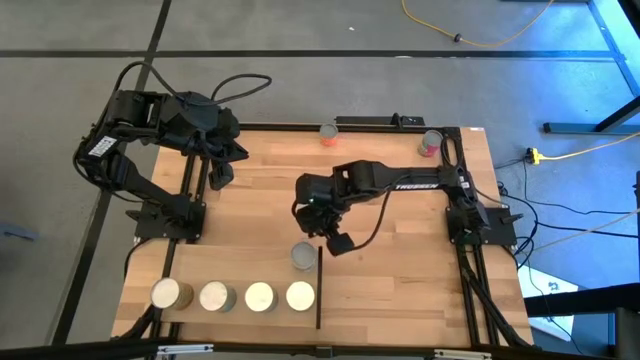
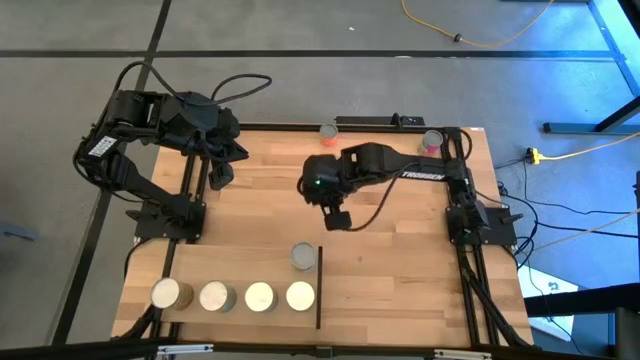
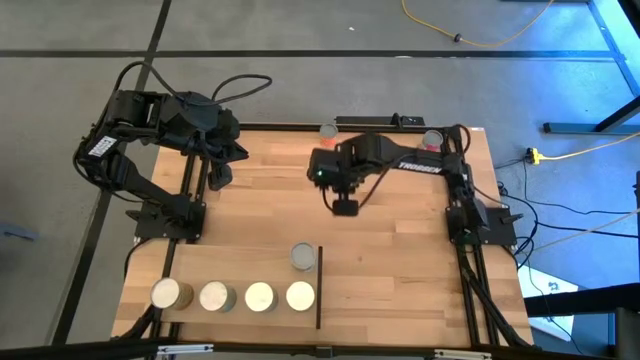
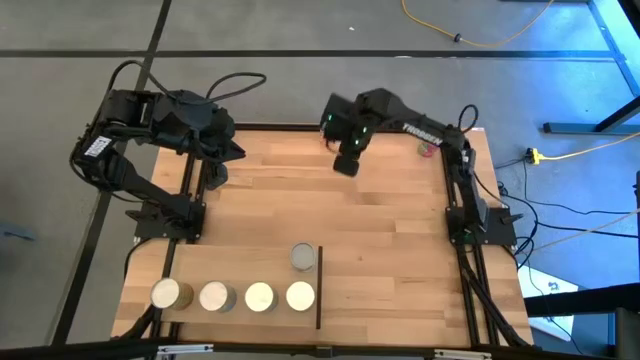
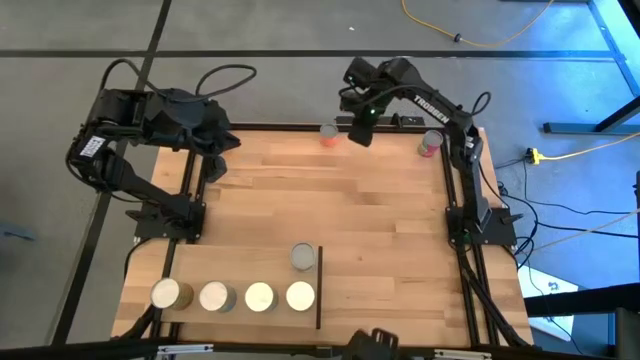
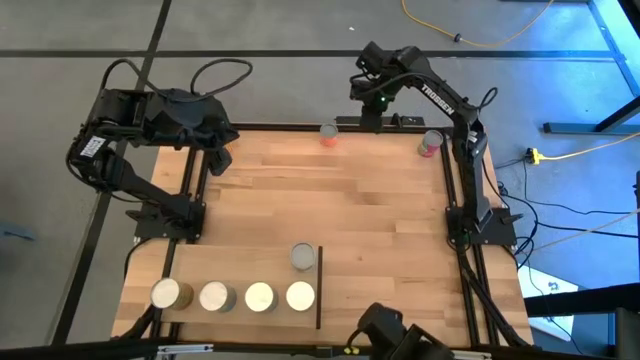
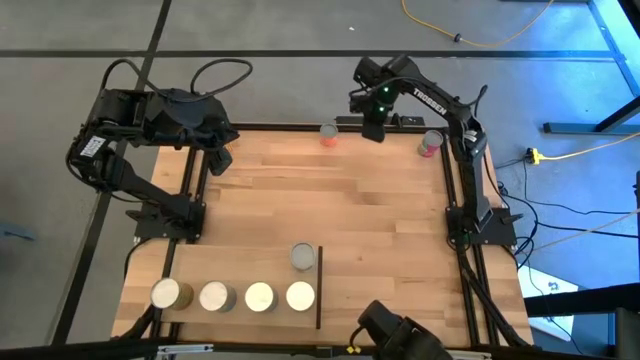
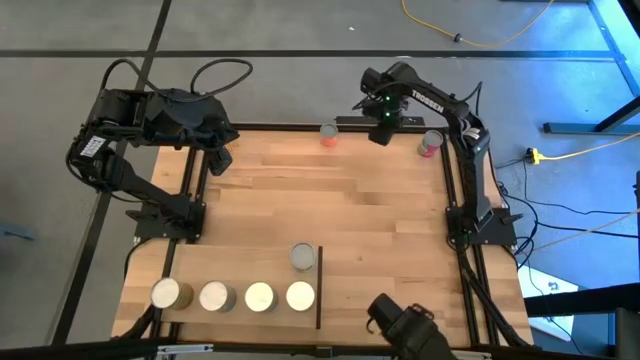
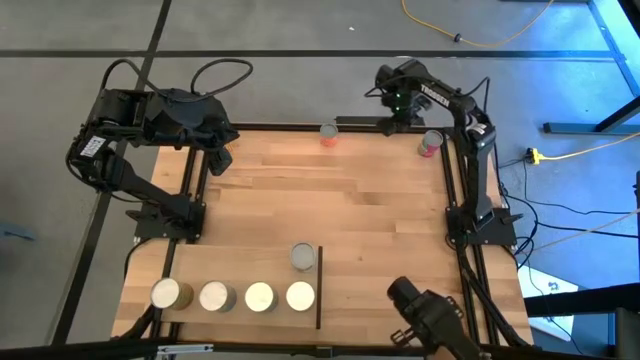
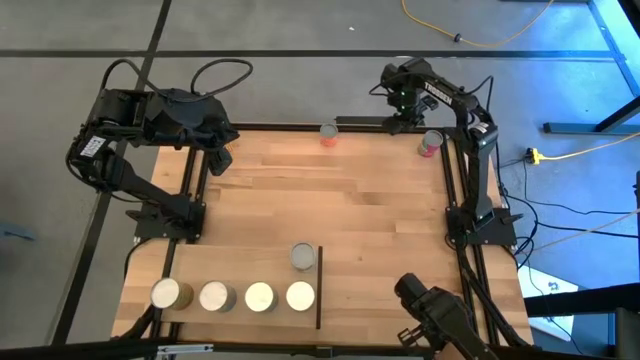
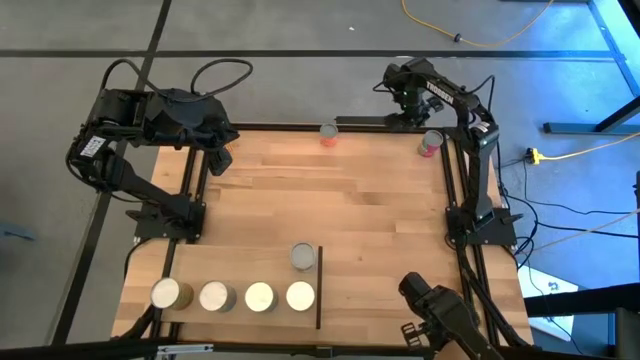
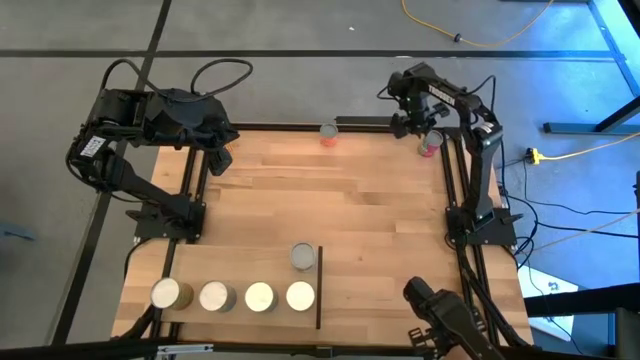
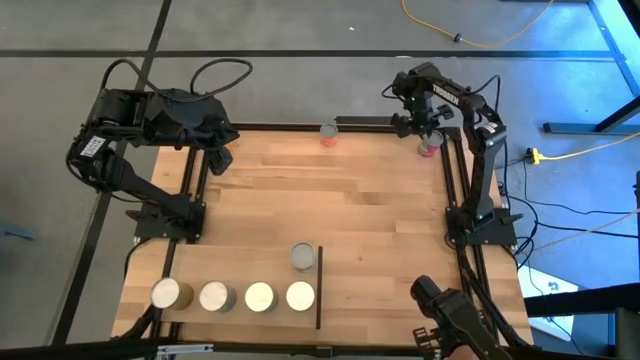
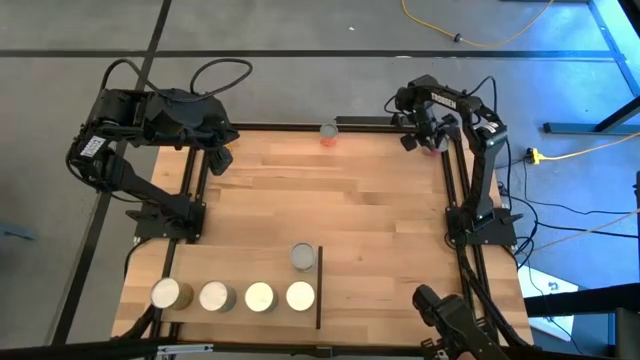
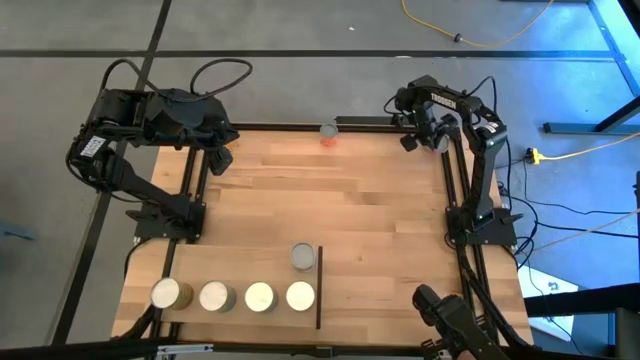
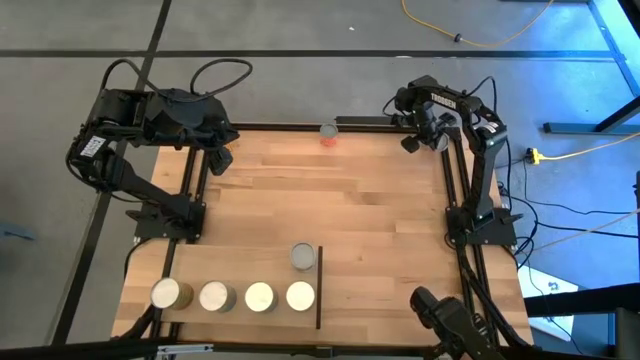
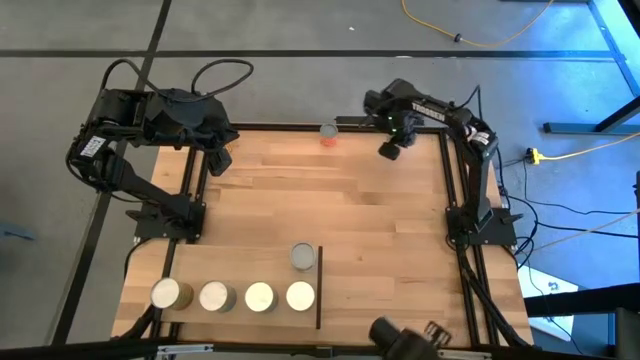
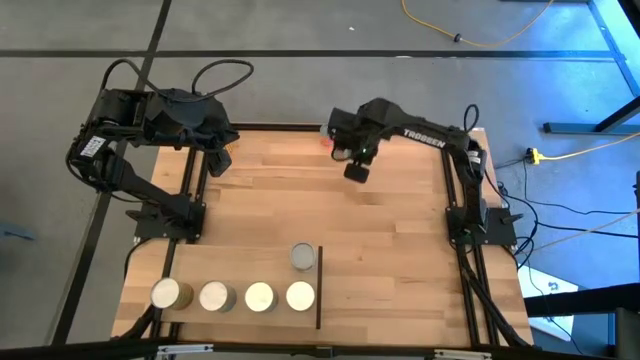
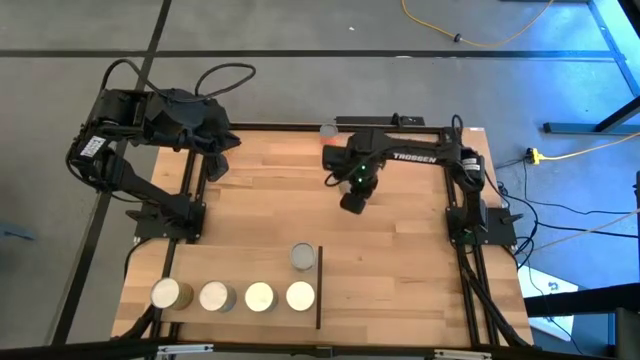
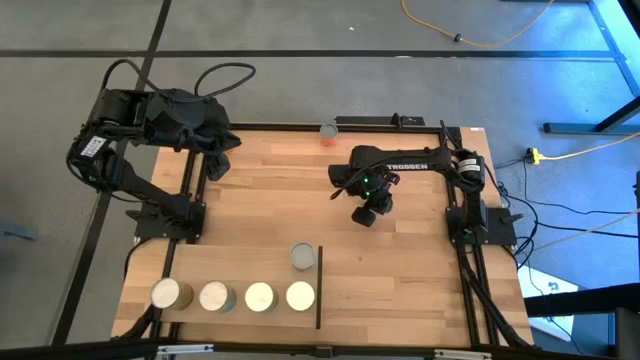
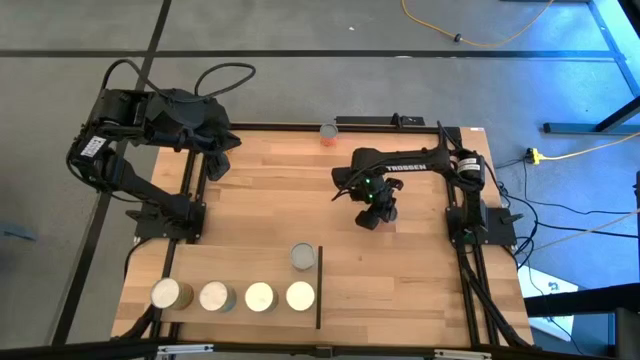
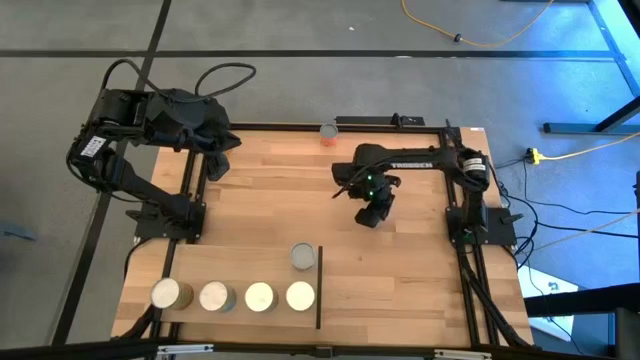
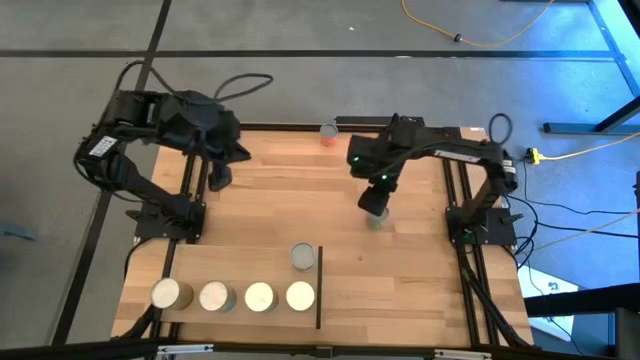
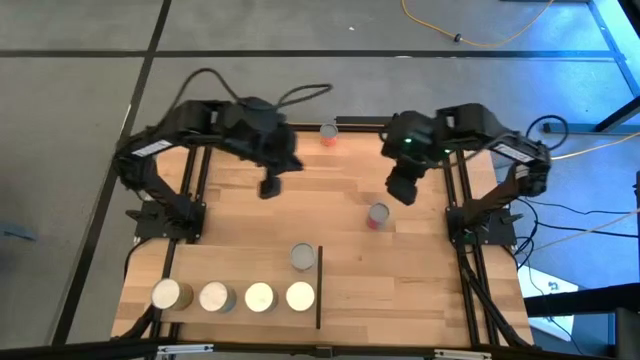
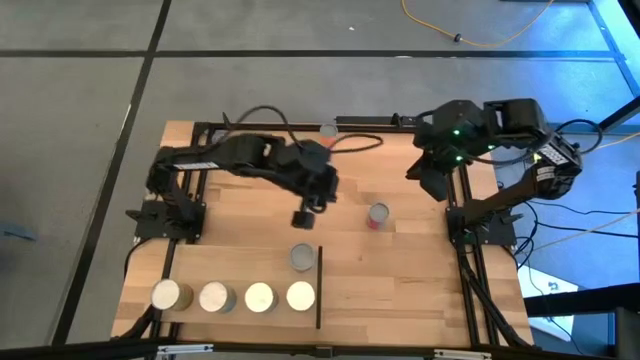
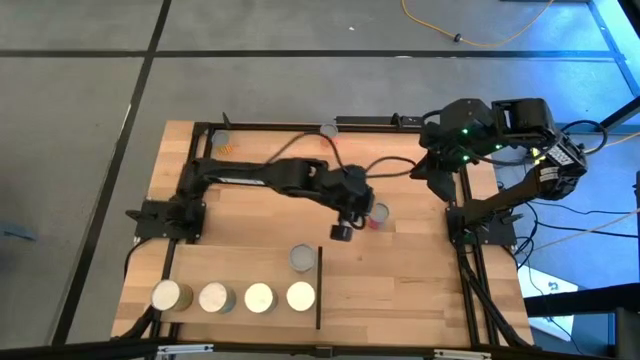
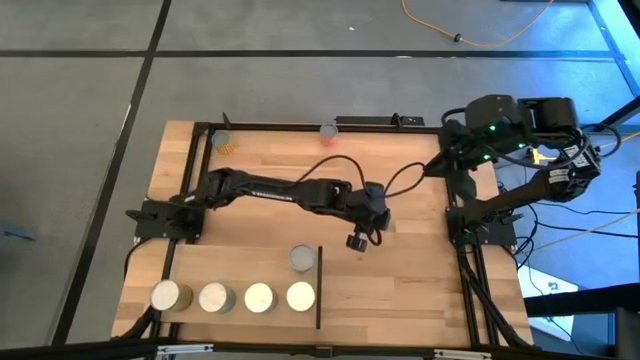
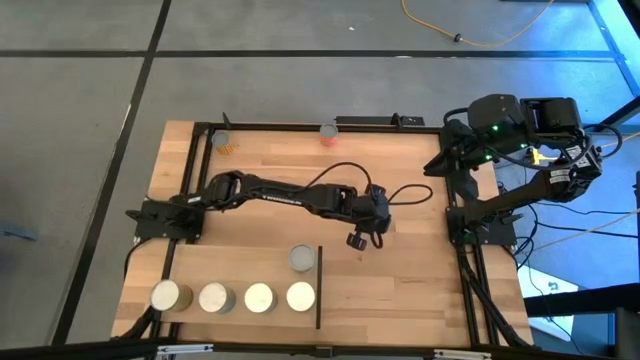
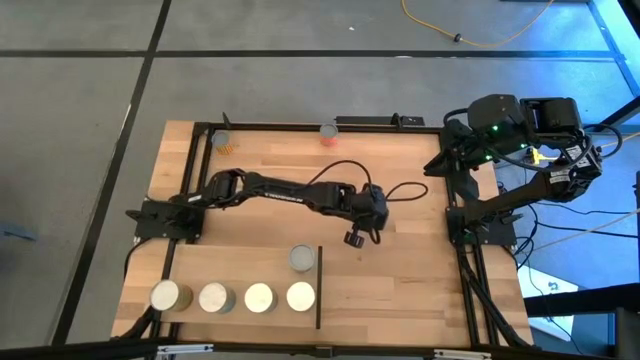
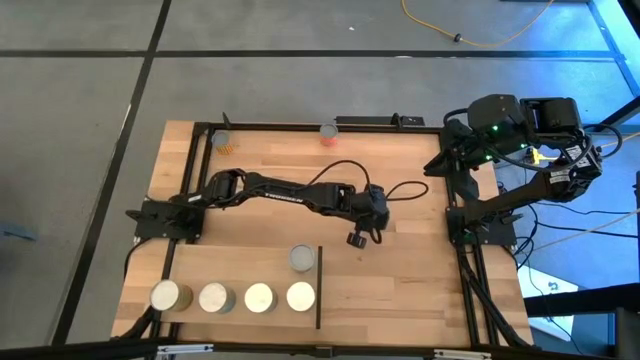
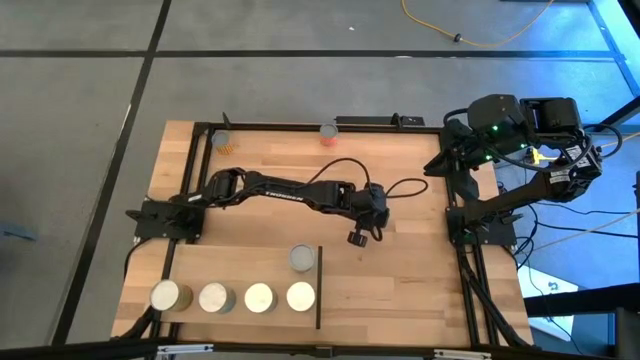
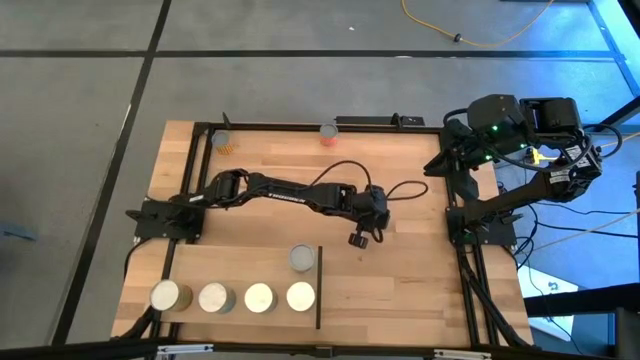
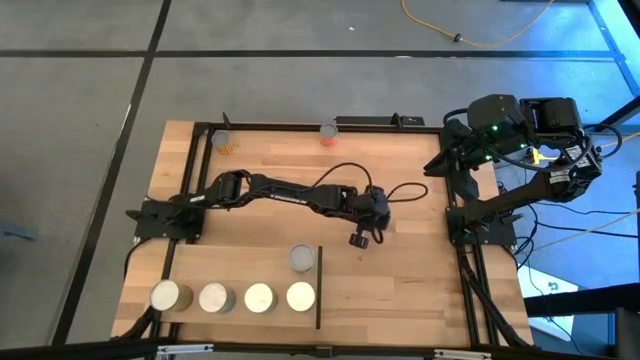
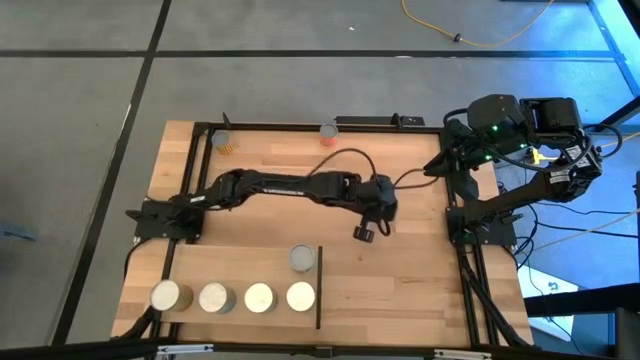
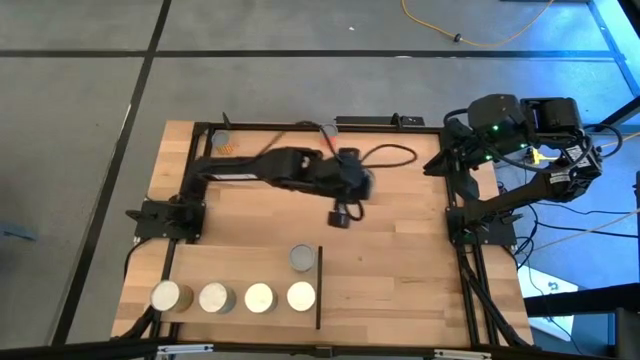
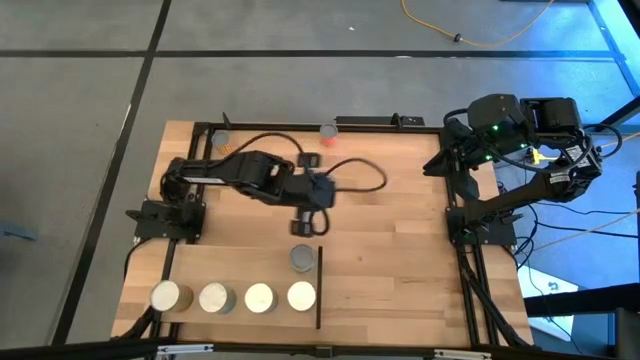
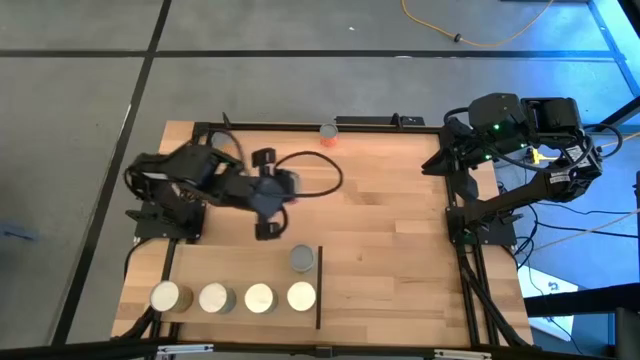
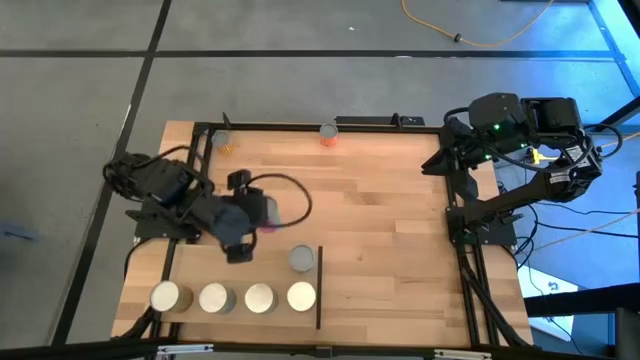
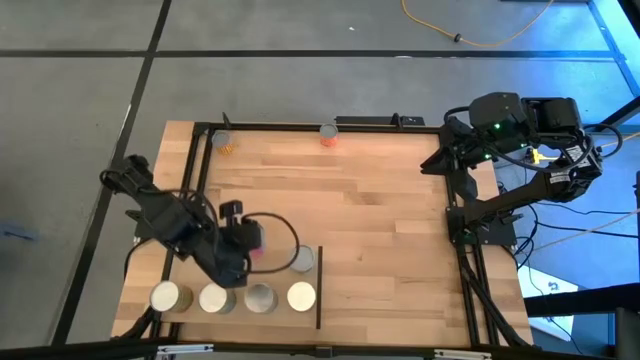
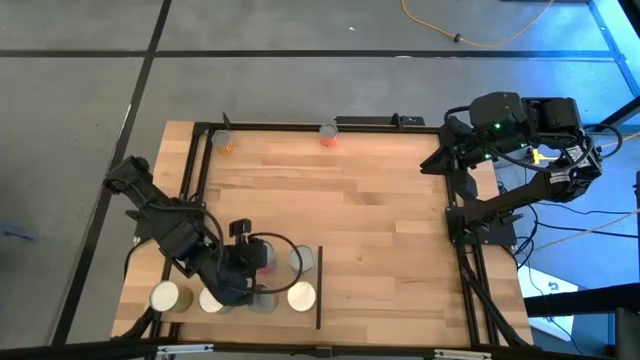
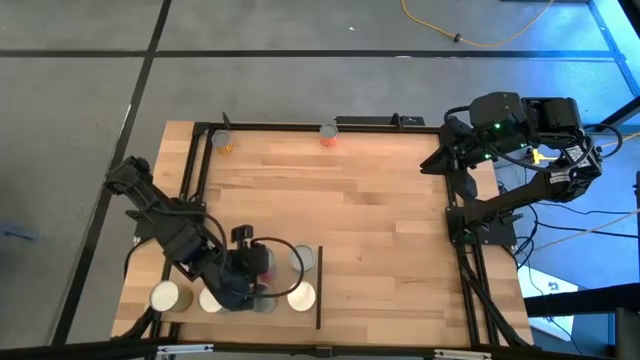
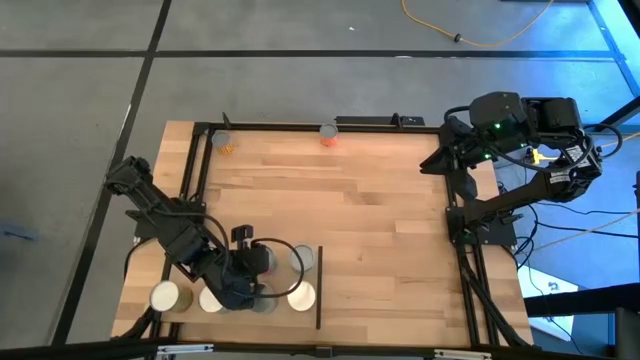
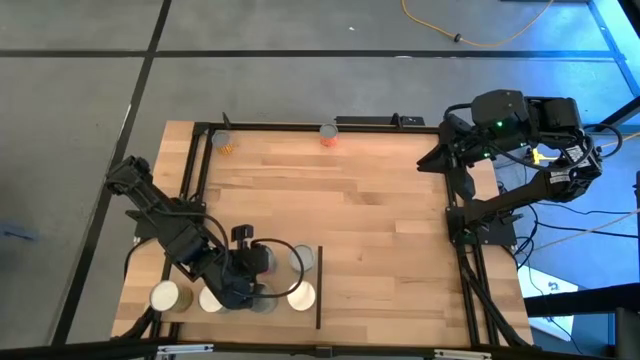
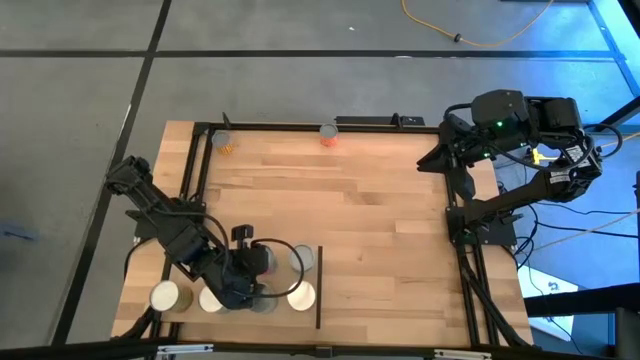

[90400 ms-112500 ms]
Task: Pick and place cans onto a shelf
Put the canned chicken soup on the shelf
